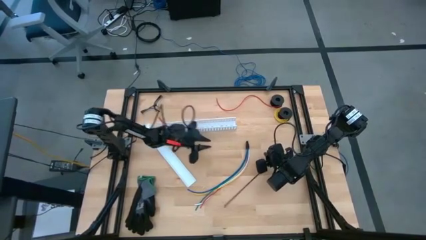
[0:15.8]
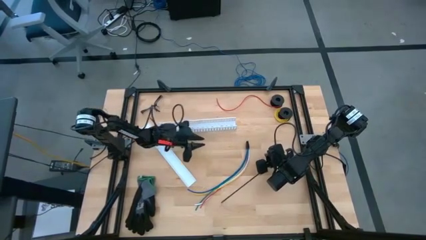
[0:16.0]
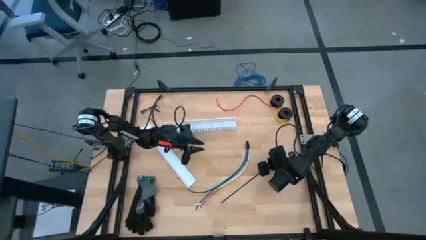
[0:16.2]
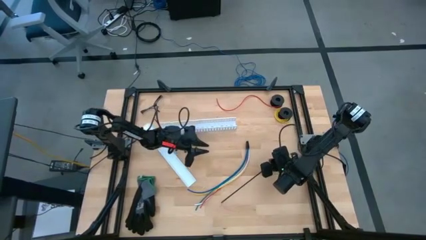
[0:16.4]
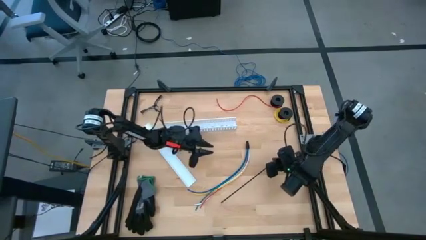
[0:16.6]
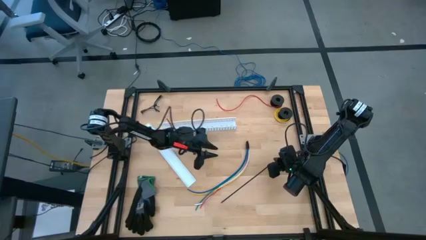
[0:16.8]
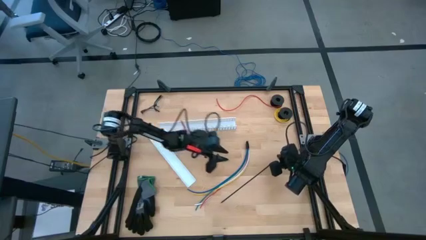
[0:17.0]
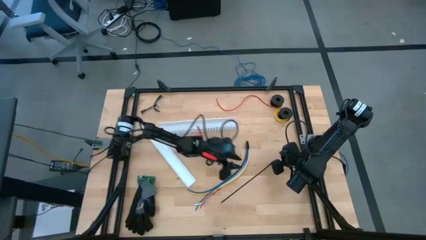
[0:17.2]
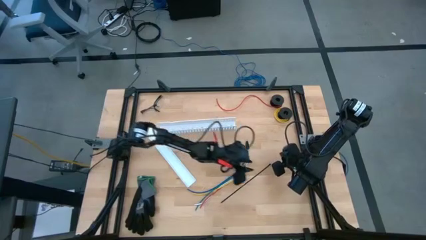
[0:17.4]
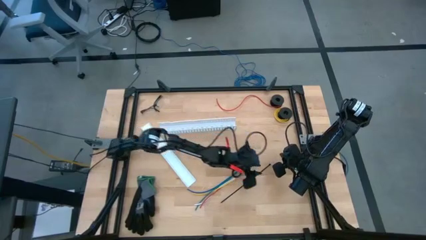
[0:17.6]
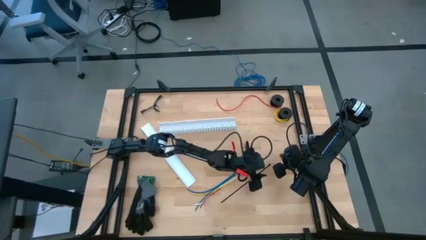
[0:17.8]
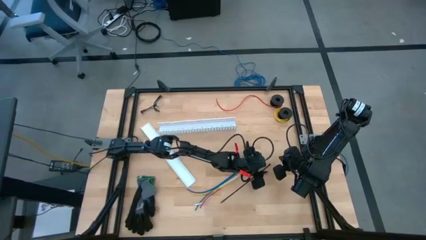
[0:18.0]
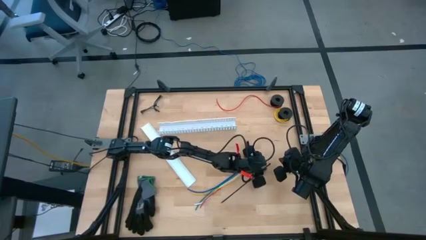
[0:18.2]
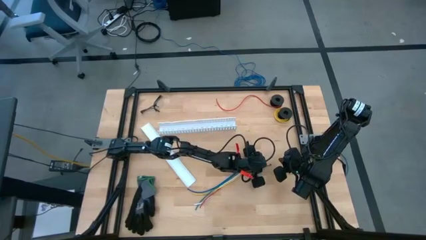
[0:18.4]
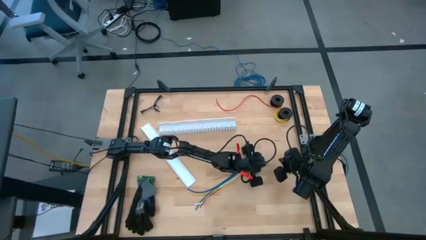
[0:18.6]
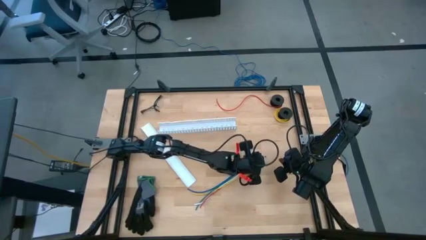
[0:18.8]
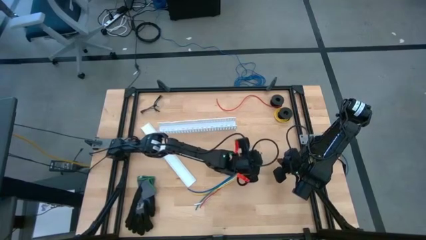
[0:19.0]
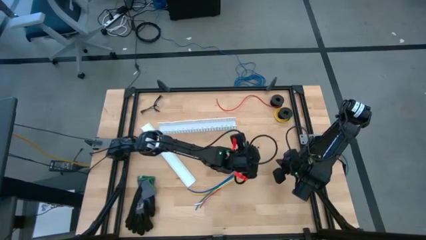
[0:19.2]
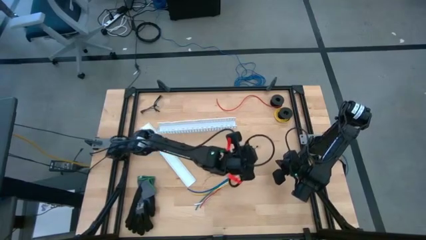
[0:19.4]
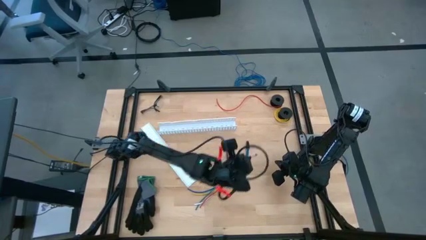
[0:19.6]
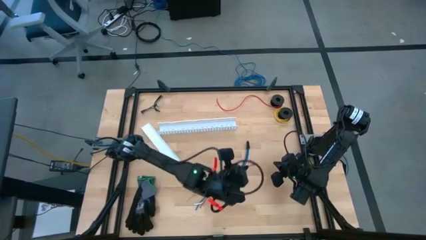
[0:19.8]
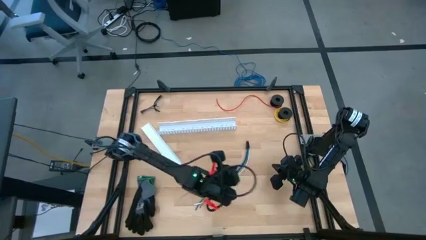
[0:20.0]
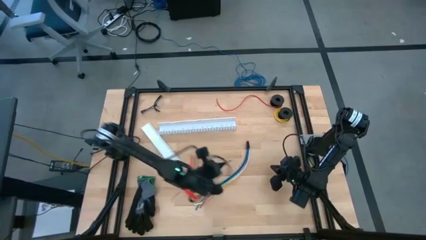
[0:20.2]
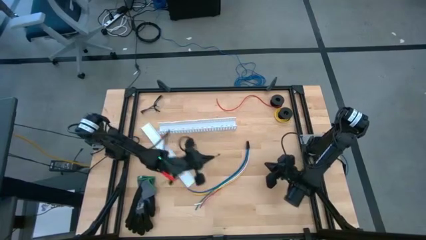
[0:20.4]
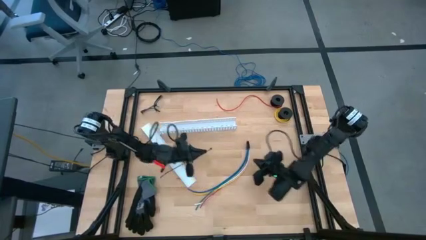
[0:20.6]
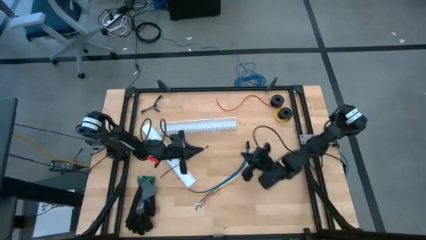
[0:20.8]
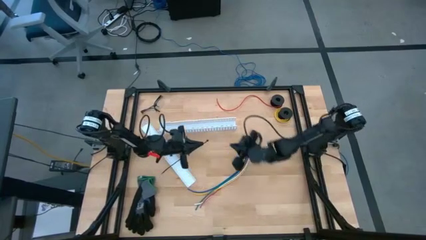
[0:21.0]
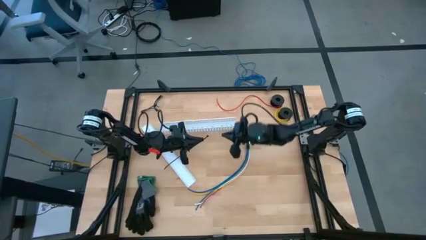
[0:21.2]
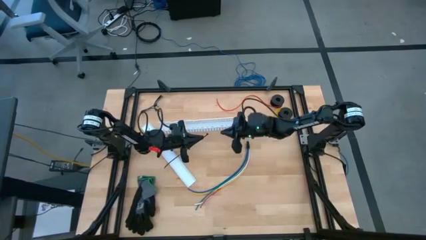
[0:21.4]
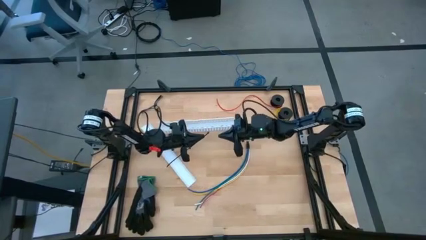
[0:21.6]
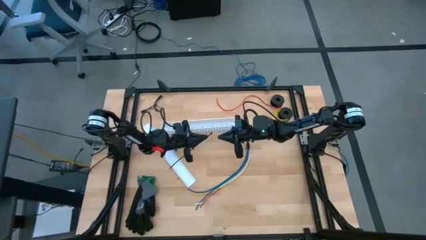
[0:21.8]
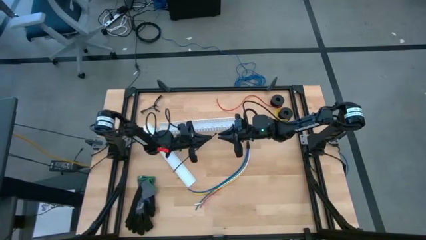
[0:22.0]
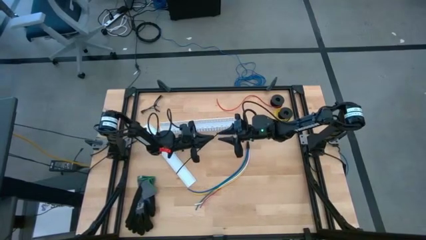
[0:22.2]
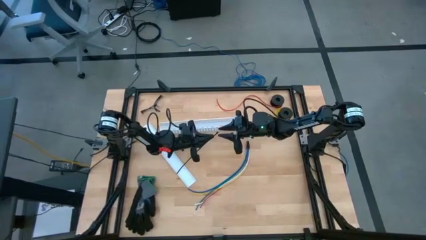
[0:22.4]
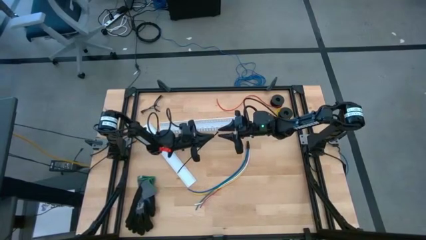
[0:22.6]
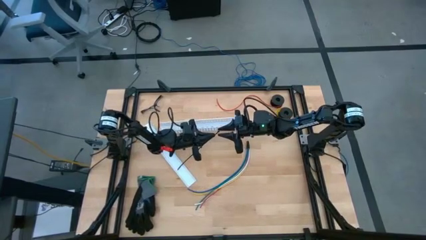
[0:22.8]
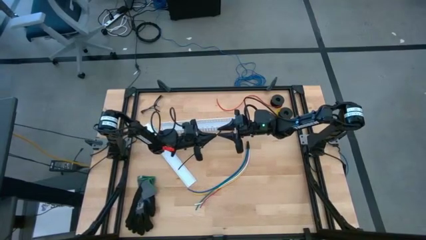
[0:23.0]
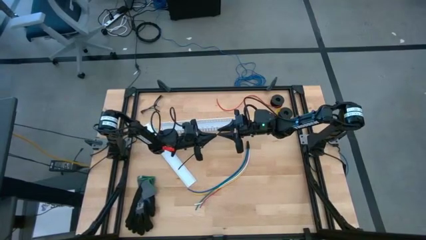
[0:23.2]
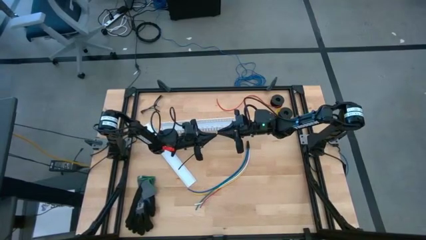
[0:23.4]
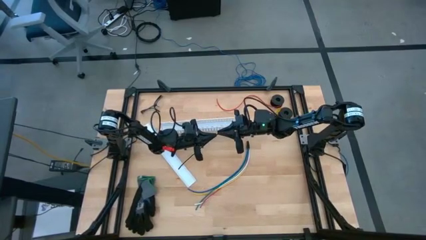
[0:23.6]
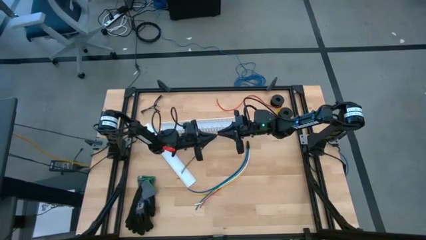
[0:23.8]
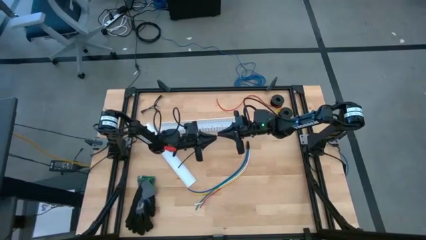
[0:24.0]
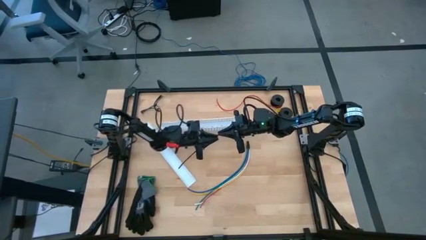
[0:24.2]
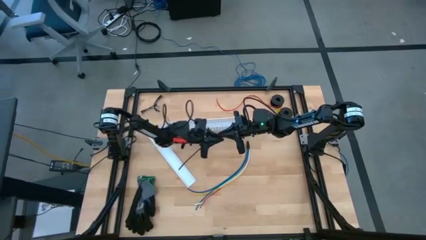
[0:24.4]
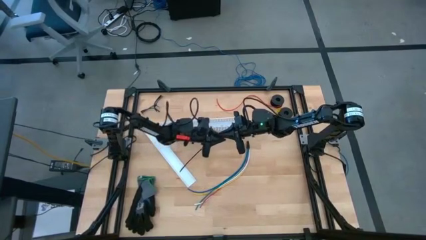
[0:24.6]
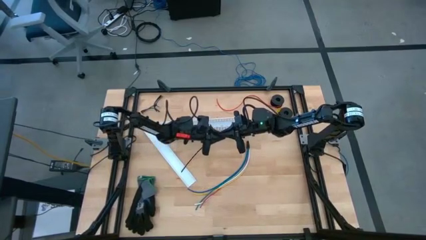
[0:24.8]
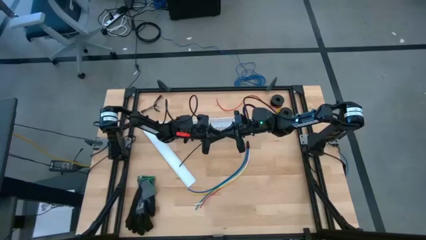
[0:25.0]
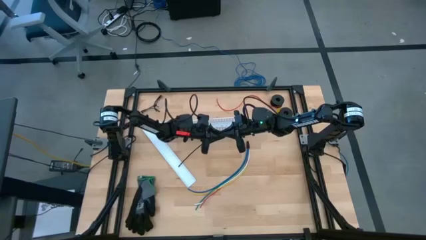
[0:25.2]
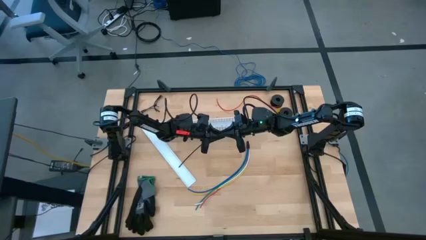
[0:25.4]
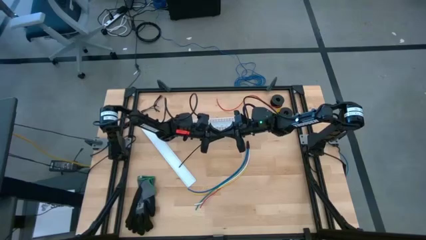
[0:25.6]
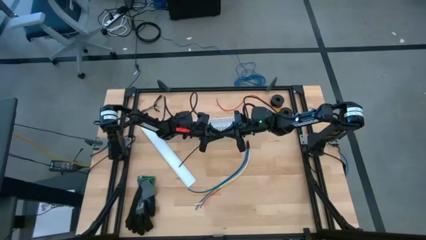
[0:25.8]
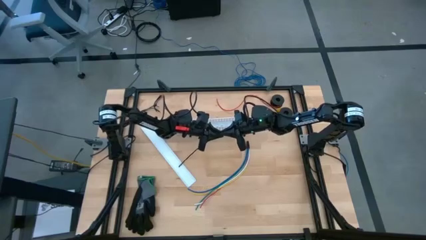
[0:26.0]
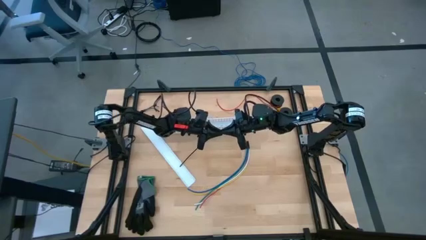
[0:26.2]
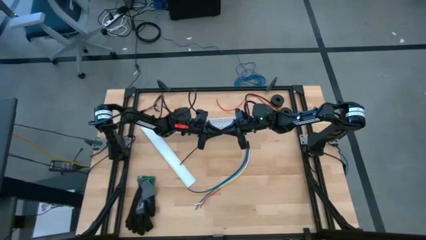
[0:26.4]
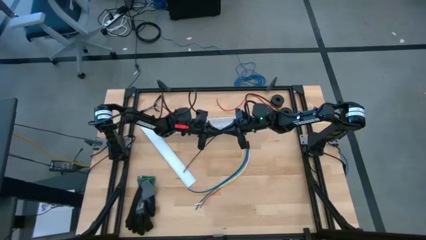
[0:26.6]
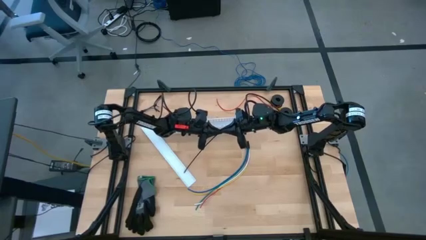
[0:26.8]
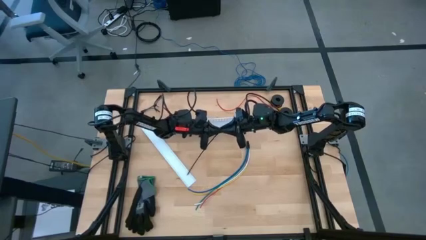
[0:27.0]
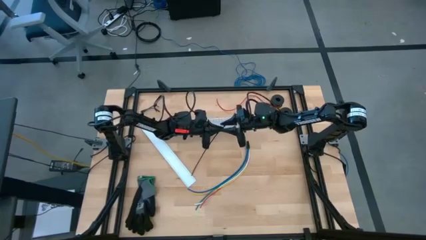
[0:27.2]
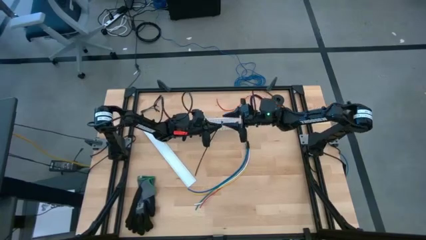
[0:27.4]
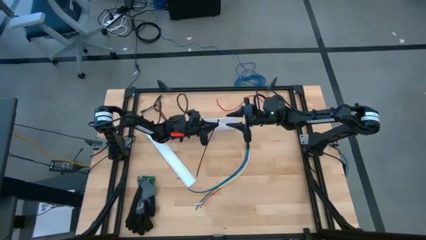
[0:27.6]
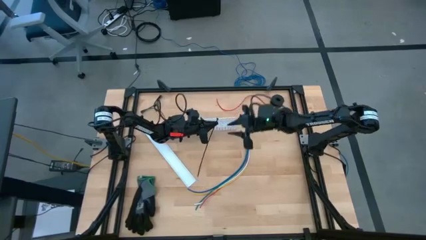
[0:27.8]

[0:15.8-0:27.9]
Task: Ziptie cables
Prepare the black zip tie
